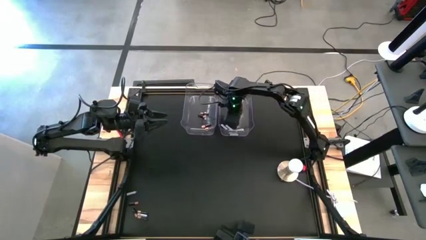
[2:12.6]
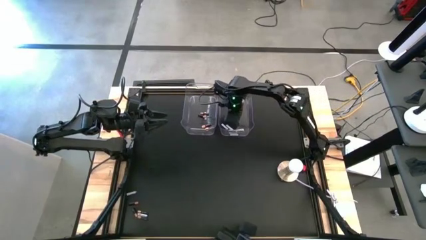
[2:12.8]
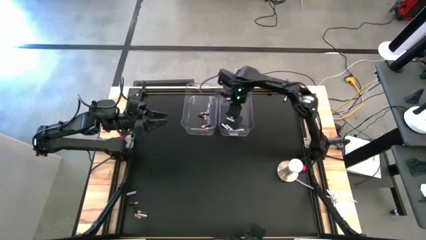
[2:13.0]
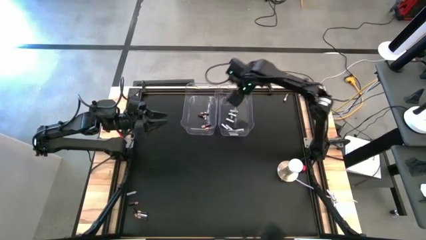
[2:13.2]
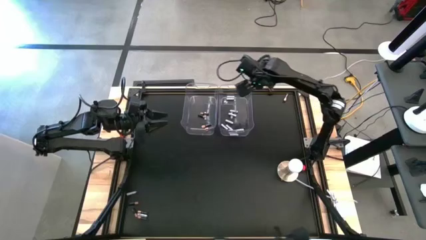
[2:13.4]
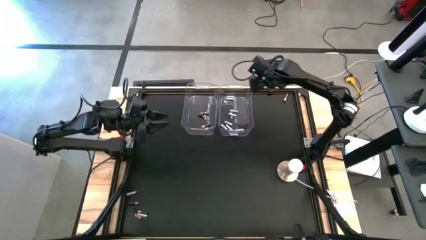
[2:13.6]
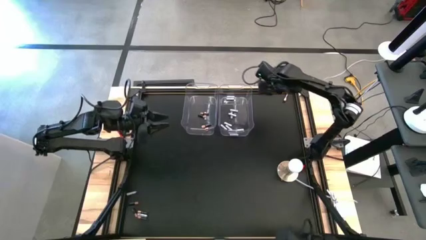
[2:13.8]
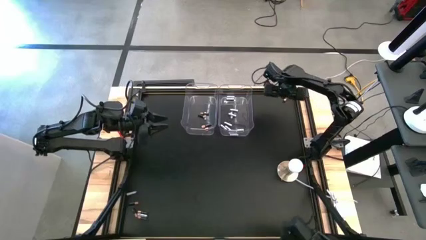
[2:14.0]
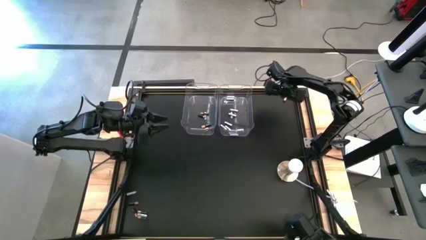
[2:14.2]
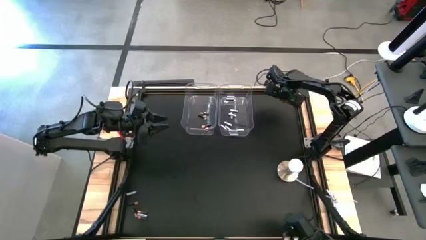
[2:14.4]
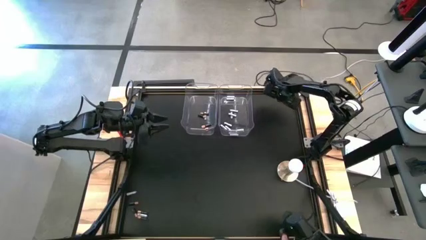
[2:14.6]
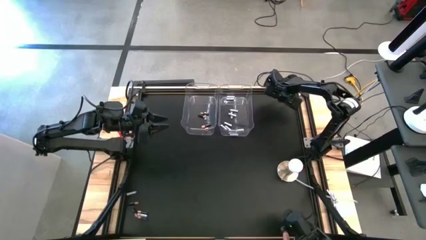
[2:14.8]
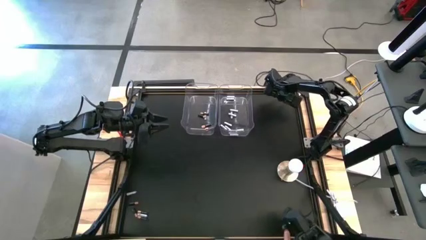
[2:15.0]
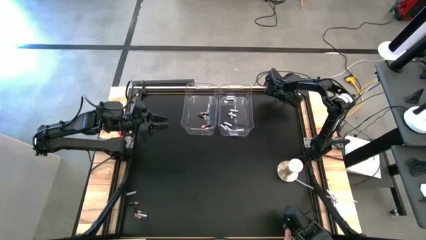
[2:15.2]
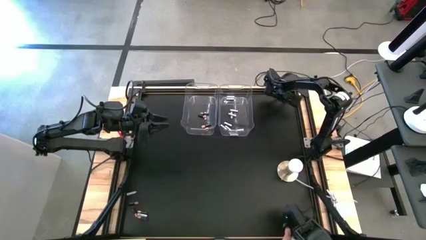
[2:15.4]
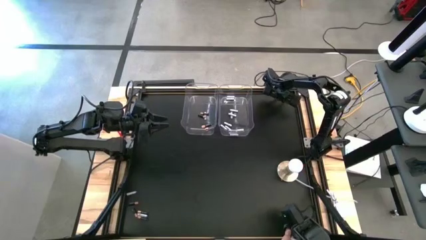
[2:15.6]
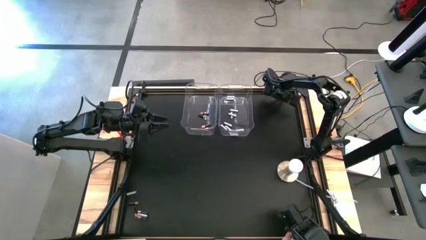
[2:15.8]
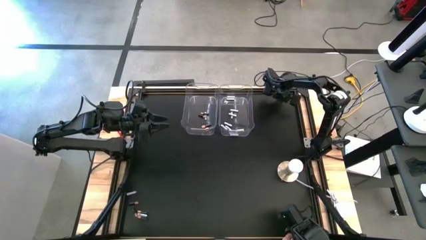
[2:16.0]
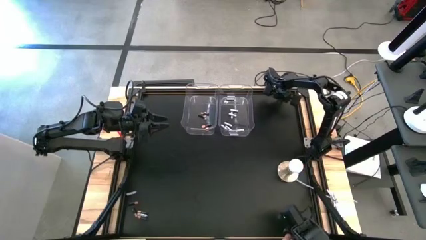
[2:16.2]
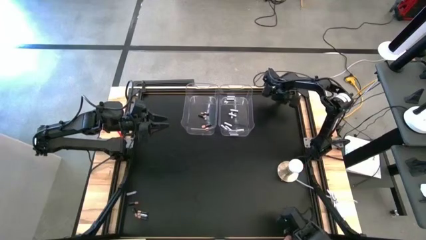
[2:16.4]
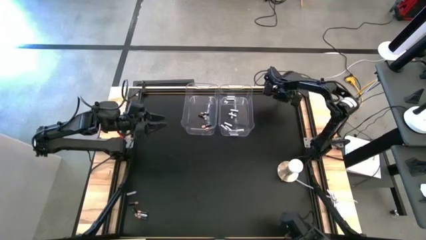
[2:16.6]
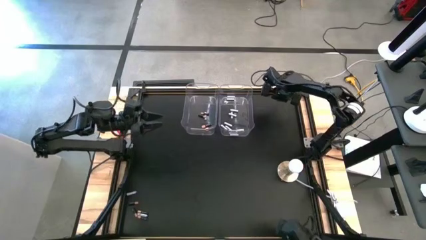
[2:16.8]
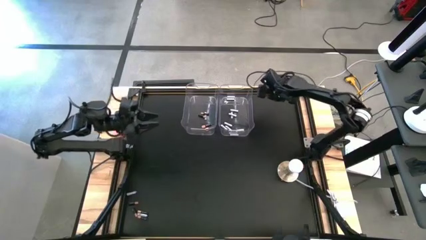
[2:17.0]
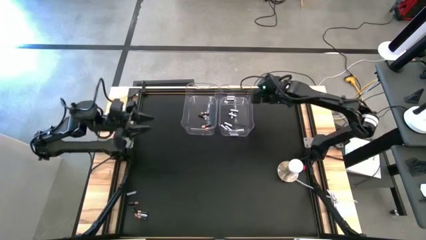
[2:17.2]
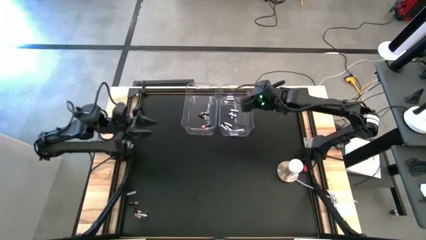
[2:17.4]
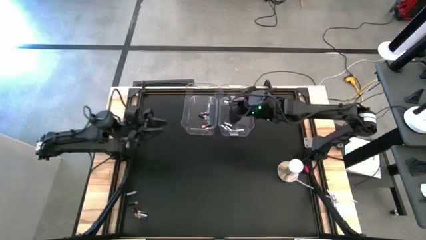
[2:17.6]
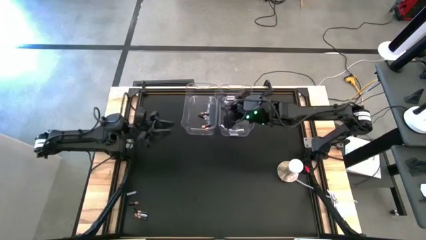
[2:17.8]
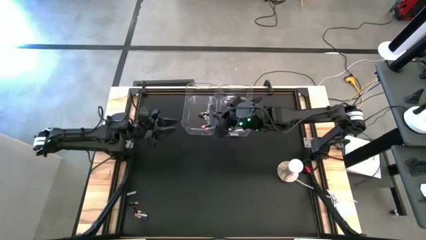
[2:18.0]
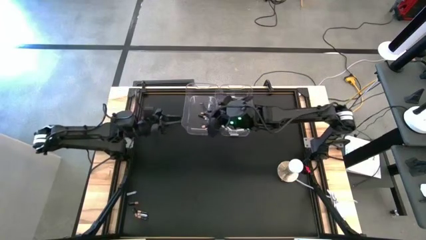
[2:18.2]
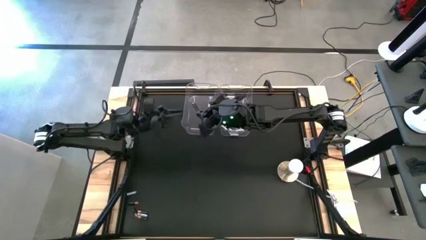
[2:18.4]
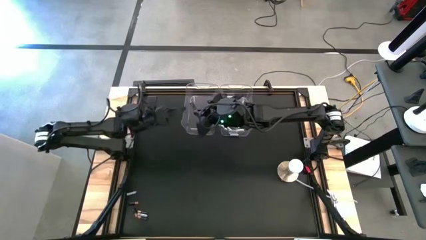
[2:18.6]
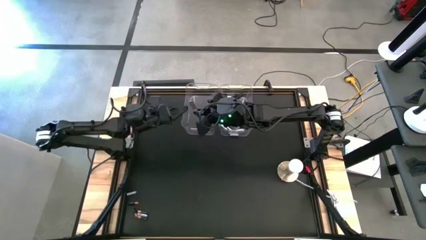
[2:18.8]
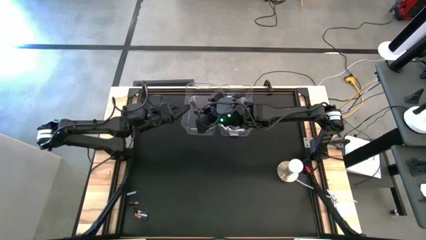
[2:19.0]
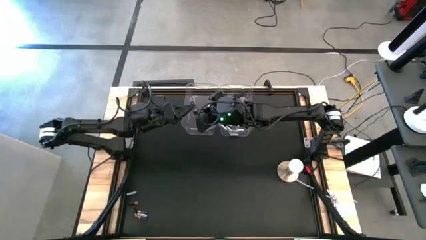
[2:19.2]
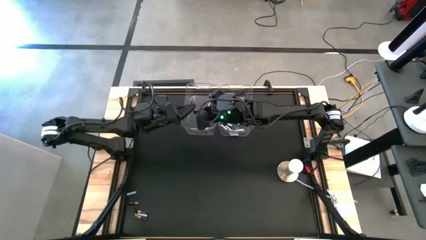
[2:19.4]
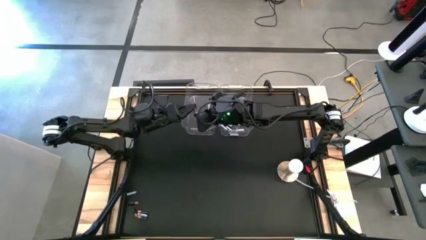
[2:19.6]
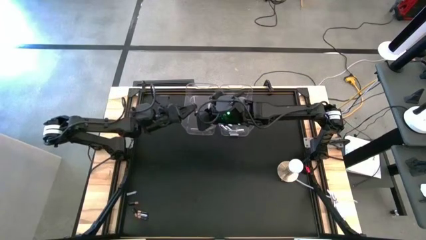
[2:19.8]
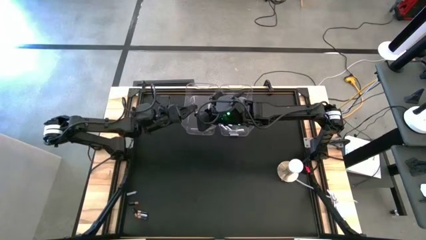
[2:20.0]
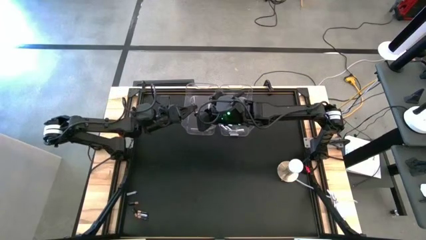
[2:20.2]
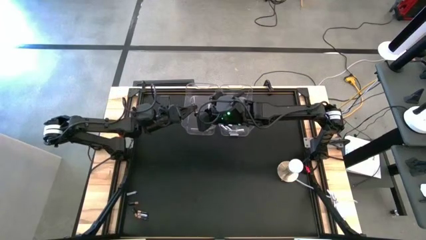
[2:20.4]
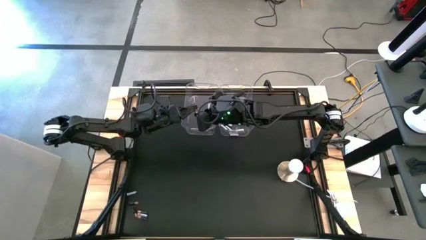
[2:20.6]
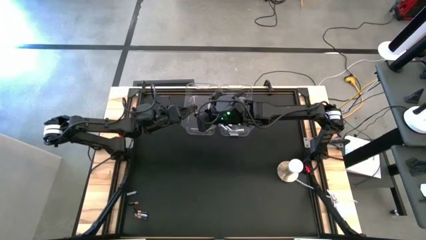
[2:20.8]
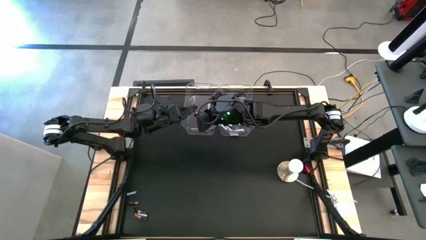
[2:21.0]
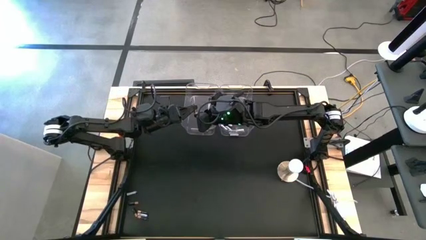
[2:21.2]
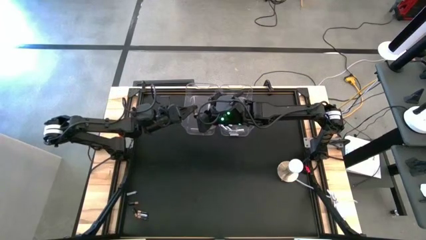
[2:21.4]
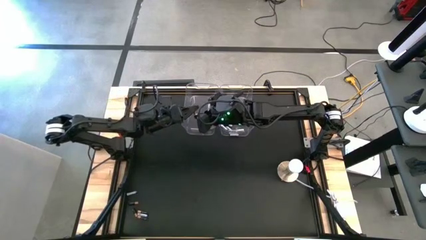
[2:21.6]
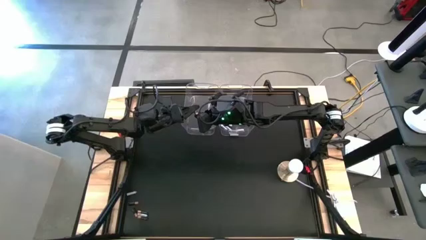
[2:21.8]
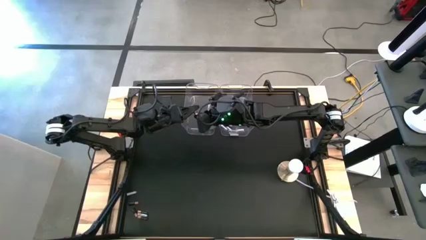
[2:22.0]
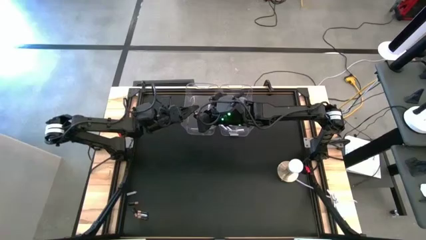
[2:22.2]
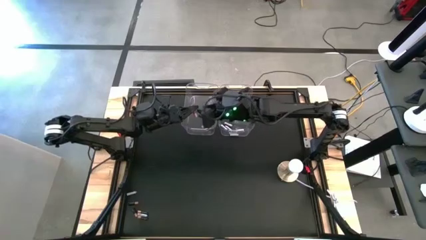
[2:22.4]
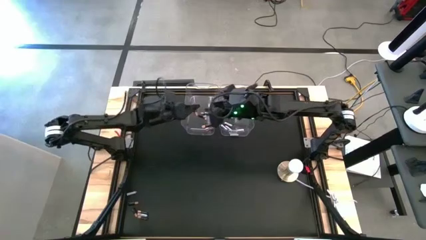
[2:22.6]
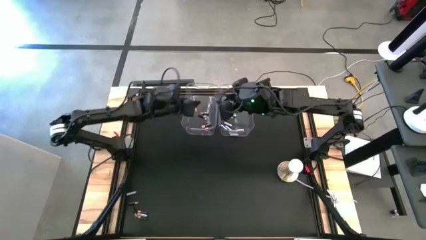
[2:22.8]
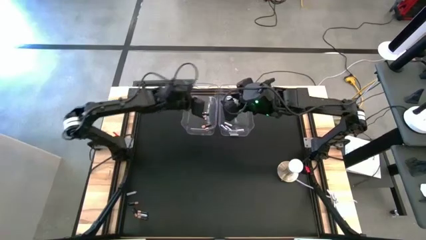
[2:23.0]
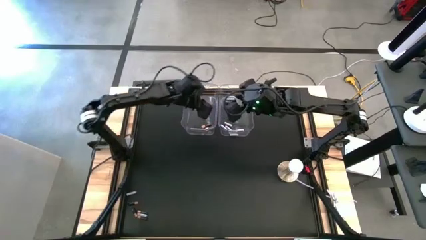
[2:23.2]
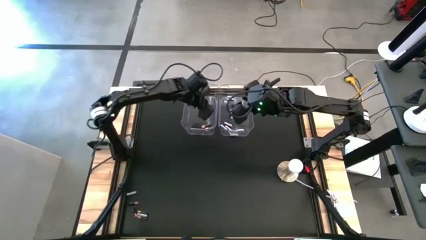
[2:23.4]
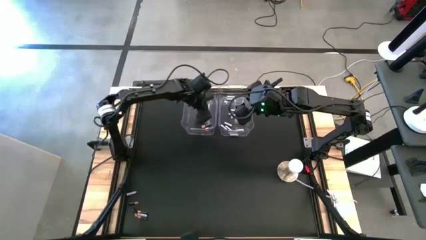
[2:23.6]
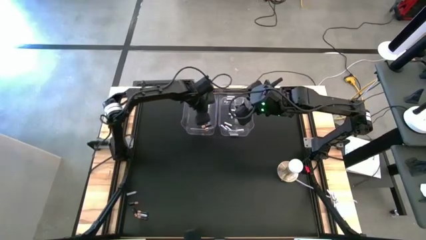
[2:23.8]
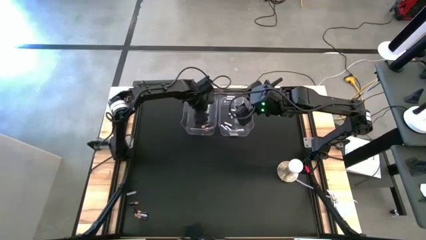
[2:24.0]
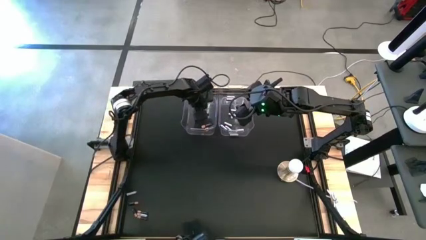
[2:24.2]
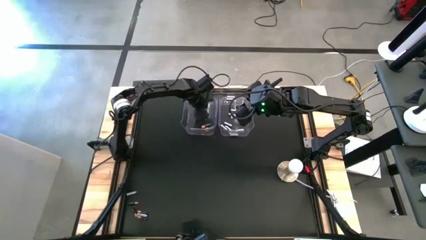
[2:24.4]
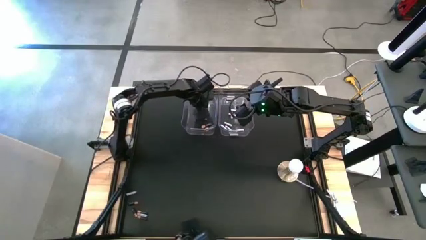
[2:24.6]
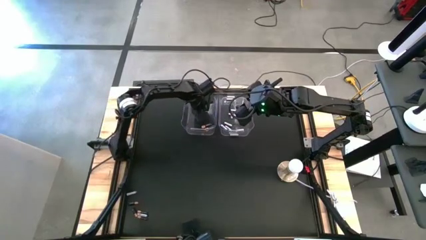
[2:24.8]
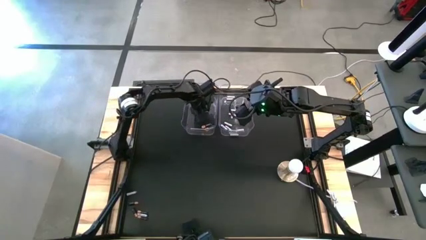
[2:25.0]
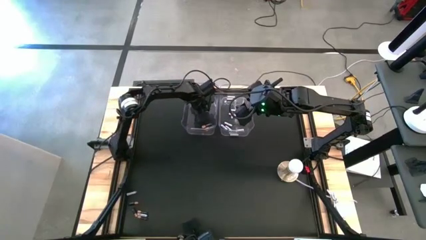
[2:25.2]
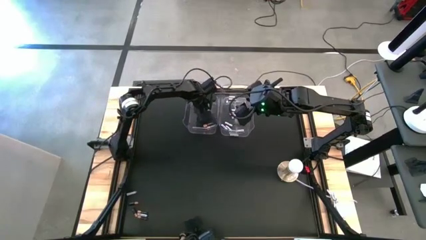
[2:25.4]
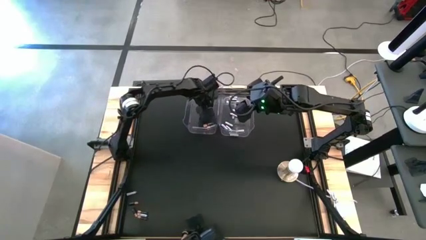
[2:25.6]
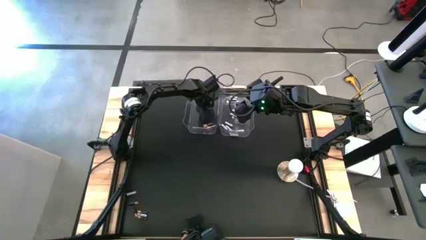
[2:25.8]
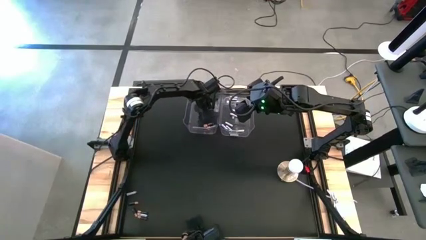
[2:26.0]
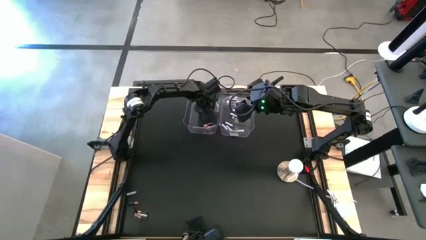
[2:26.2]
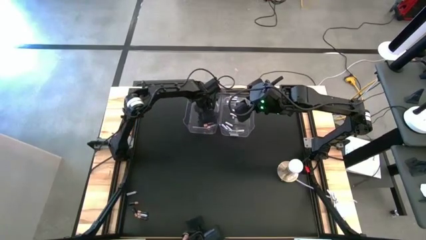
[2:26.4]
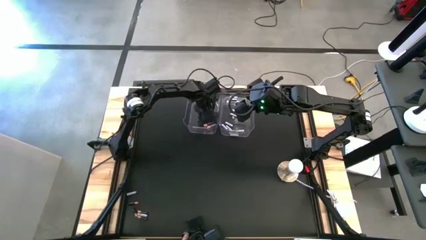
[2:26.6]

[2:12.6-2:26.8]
Task: Sort batteries
Put the black battery into the left transparent bin

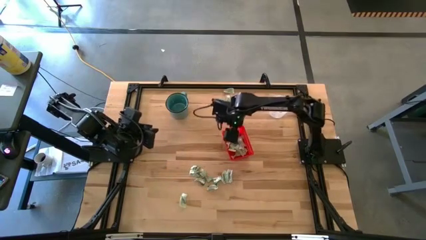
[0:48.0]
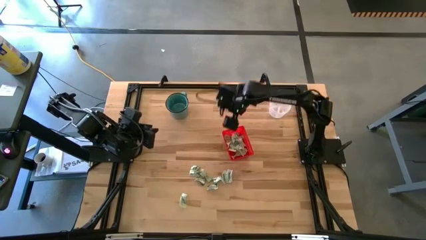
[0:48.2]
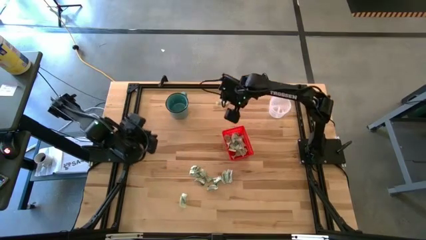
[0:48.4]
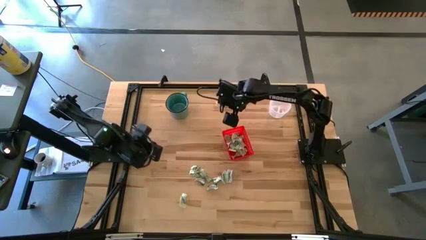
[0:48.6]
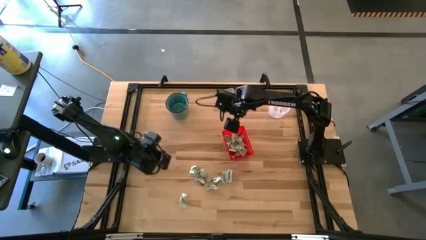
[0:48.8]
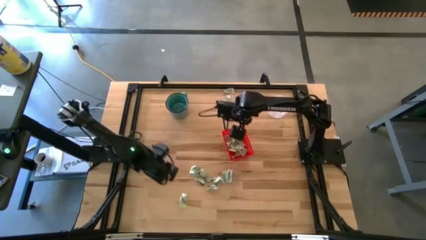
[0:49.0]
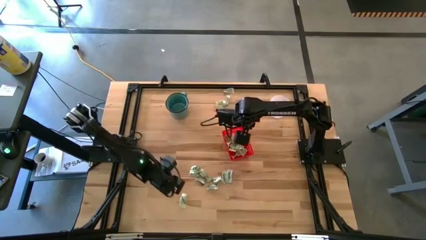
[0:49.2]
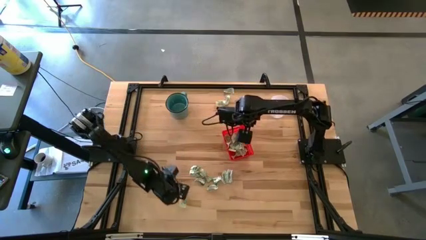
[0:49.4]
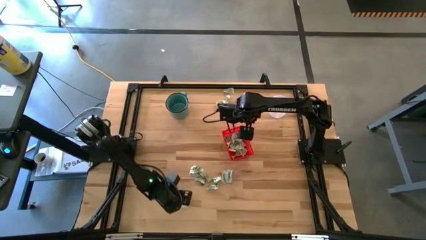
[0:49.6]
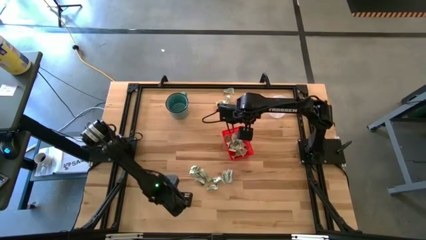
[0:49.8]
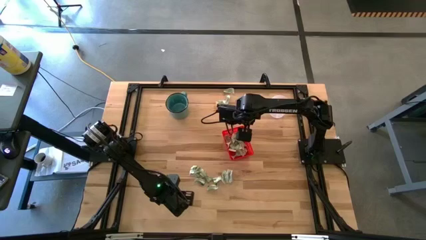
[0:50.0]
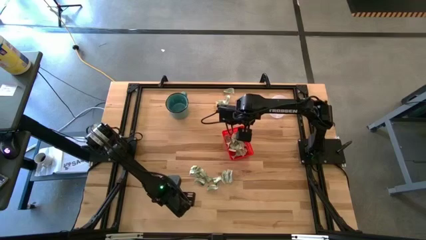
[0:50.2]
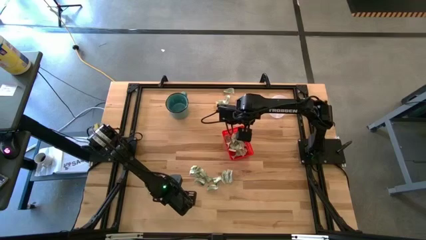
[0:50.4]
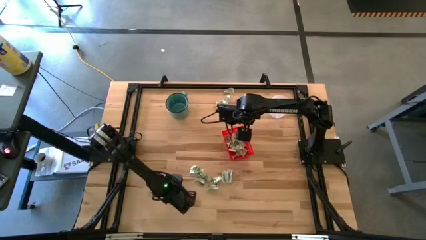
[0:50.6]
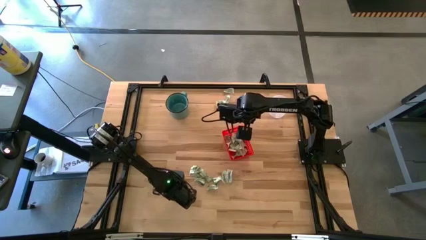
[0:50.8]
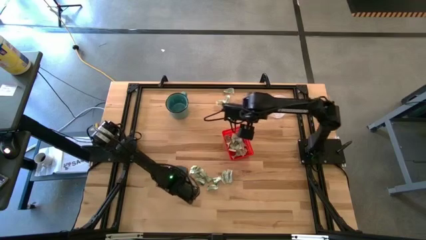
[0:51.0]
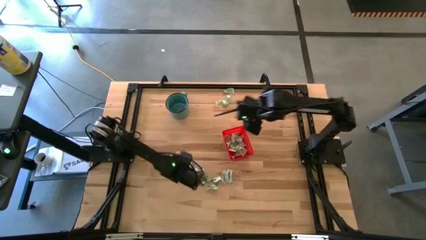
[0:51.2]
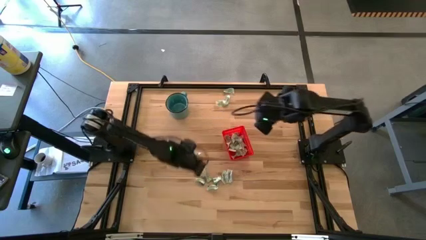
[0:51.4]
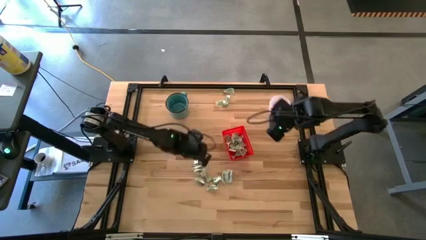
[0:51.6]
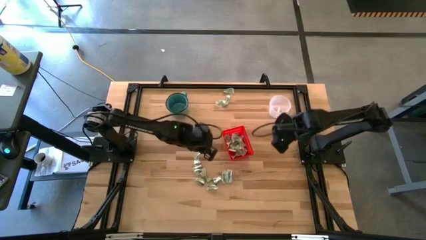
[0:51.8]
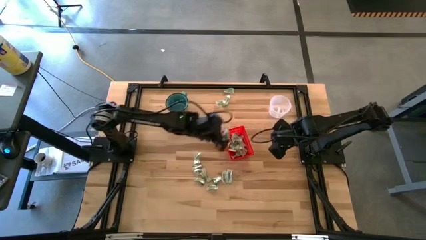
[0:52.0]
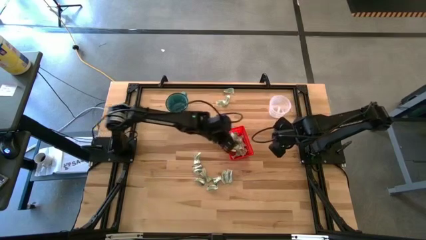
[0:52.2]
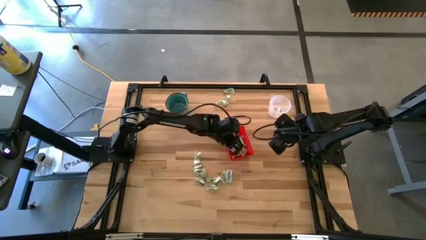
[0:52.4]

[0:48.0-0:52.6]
Task: Pick and place items into bin
Put the stevia packet into the orange bin
